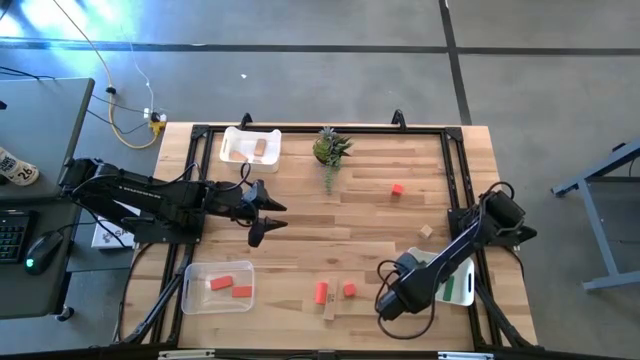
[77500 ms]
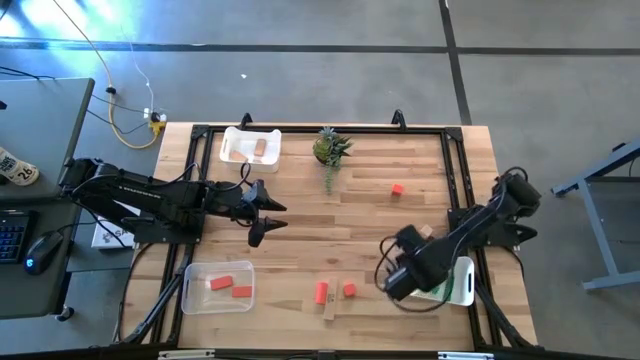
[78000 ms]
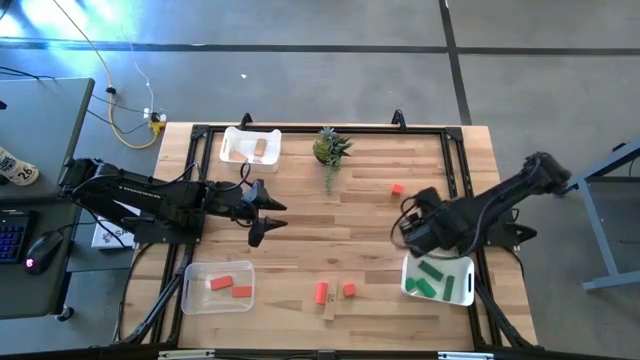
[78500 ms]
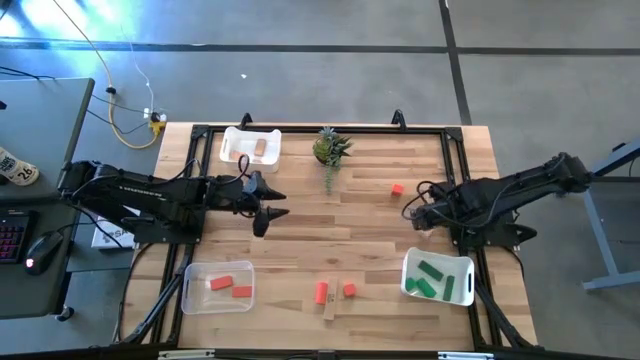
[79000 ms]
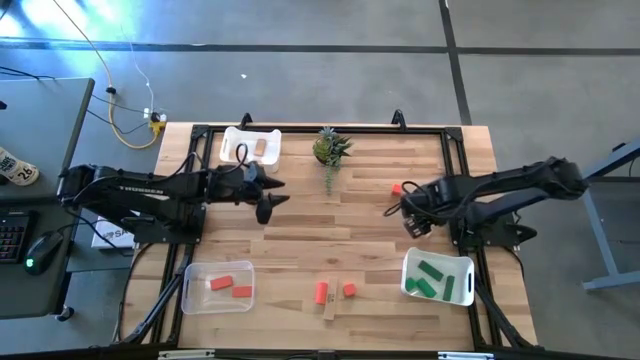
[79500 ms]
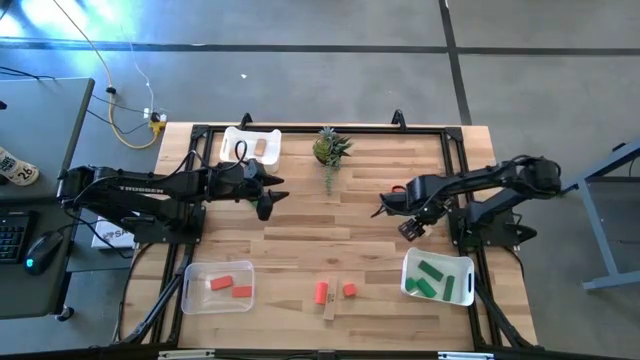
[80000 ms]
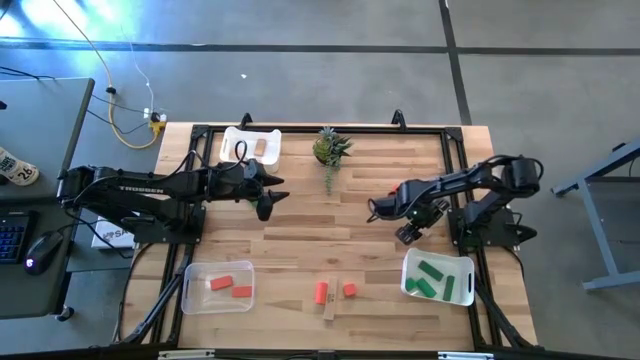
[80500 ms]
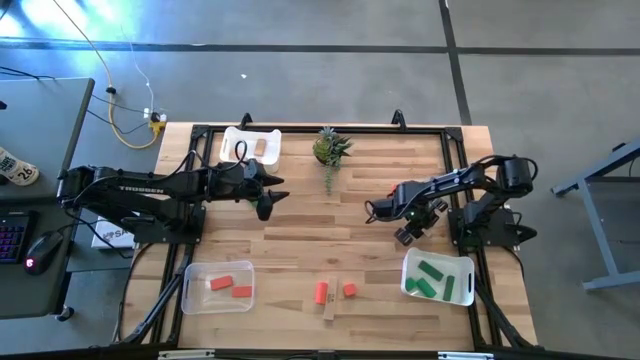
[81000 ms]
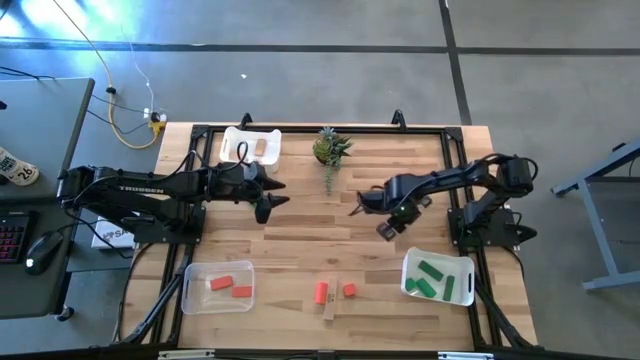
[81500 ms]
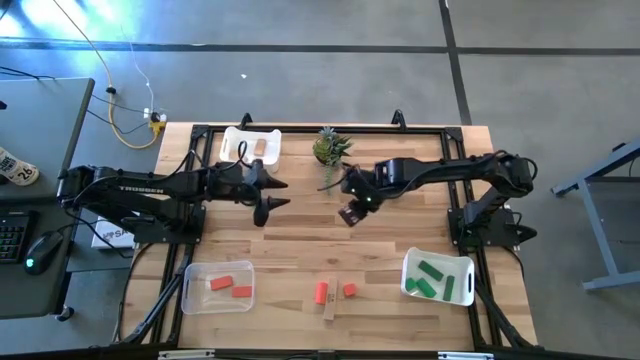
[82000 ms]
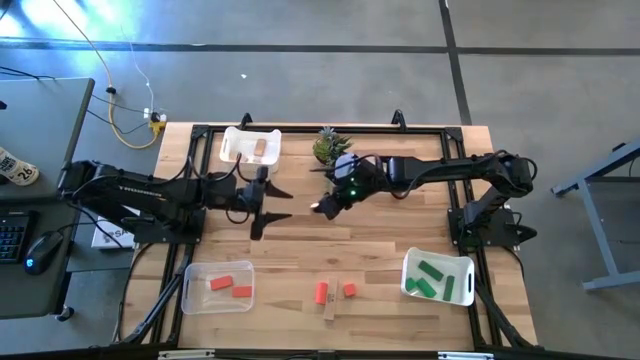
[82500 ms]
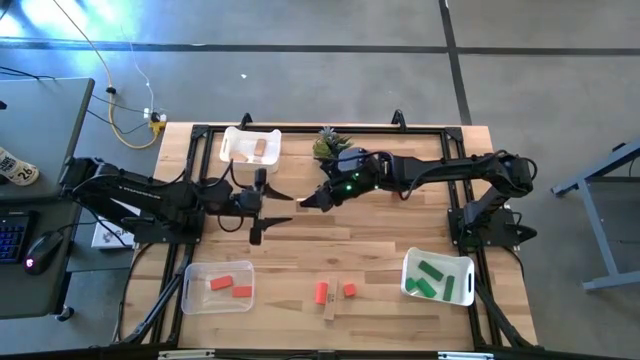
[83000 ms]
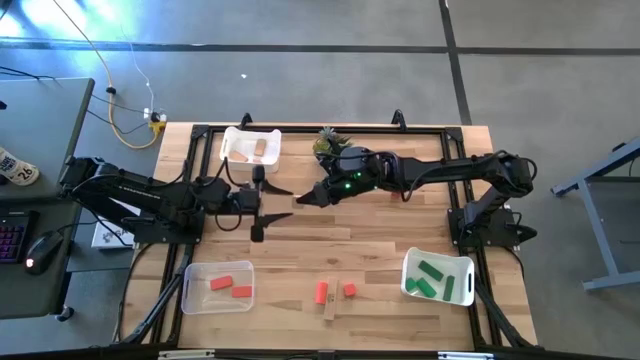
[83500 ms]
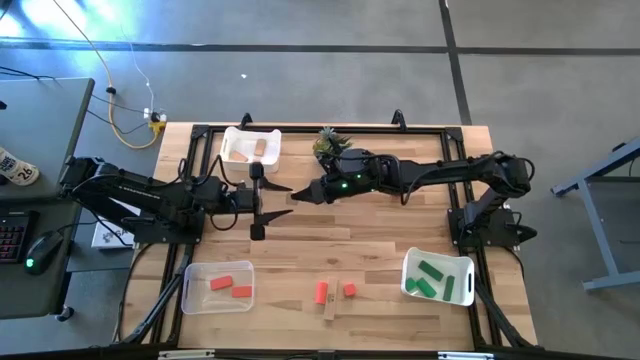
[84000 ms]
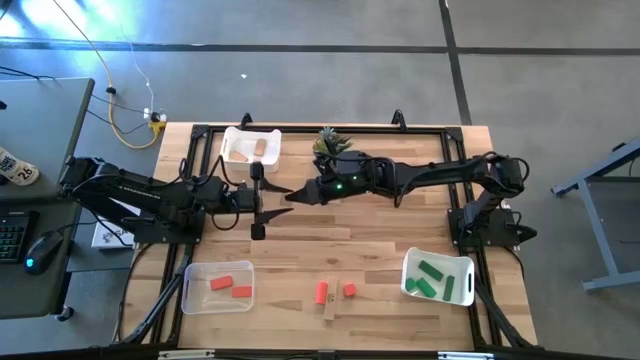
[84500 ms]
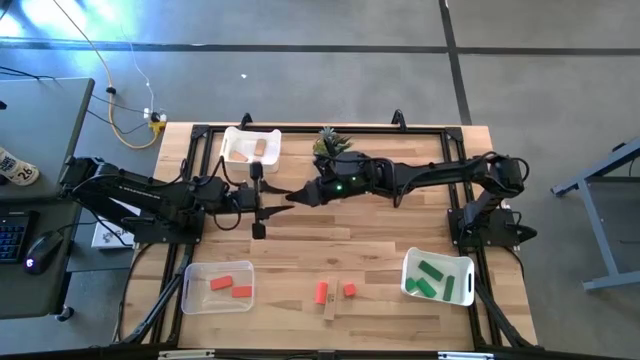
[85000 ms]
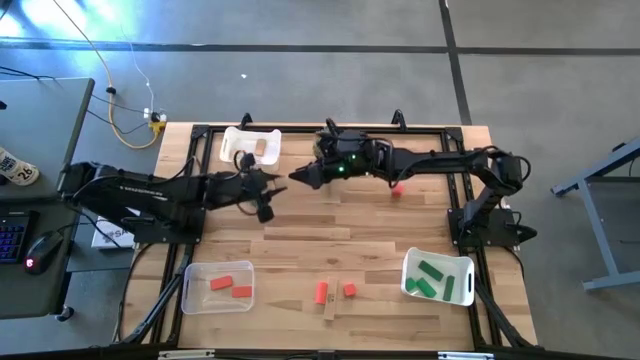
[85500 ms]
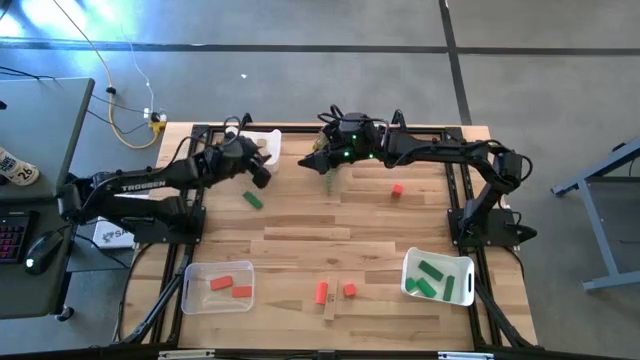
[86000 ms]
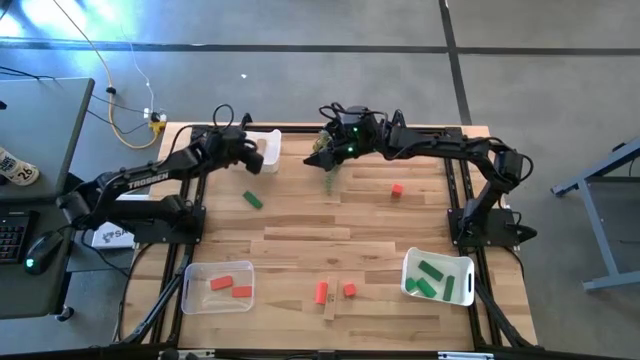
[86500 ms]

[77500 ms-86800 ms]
Task: Sort & place blocks by color
Put the brown block into the top white bin

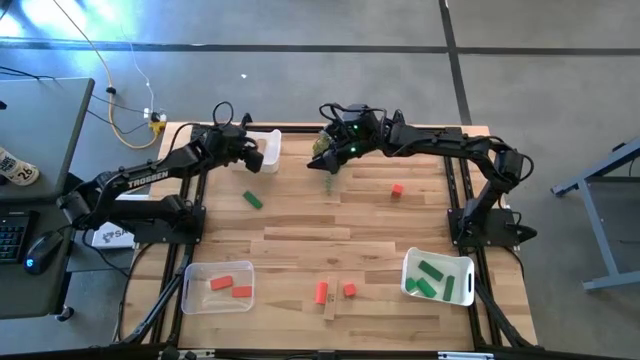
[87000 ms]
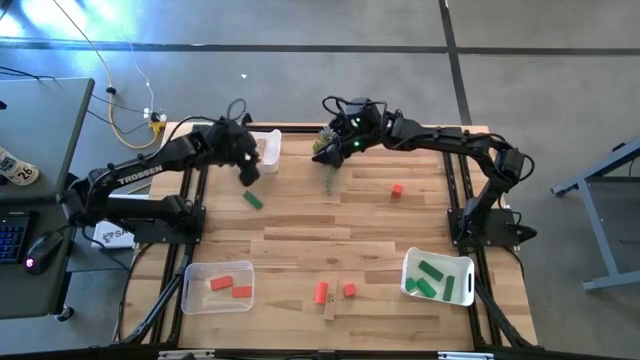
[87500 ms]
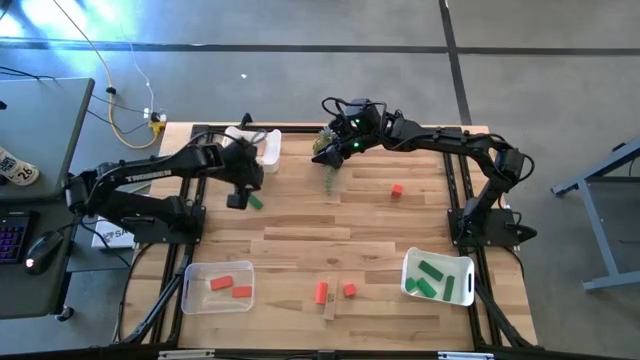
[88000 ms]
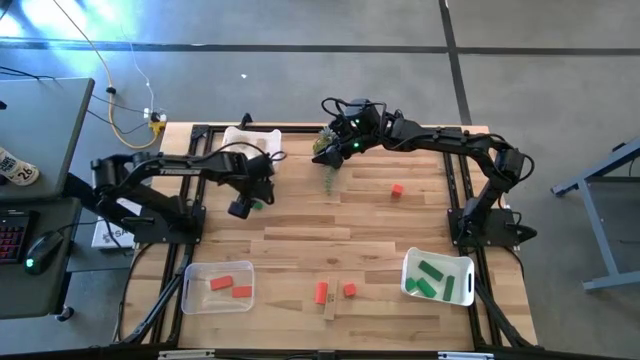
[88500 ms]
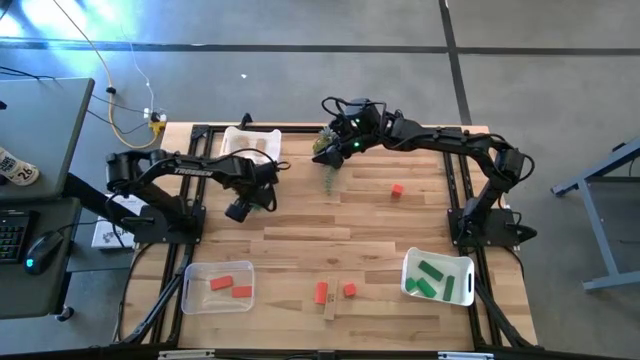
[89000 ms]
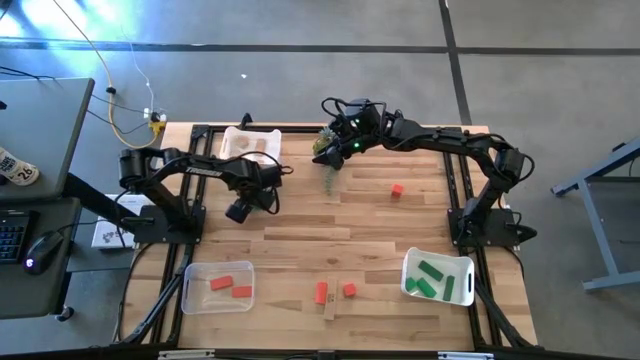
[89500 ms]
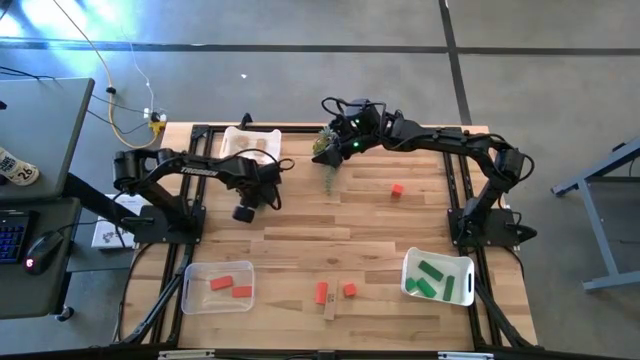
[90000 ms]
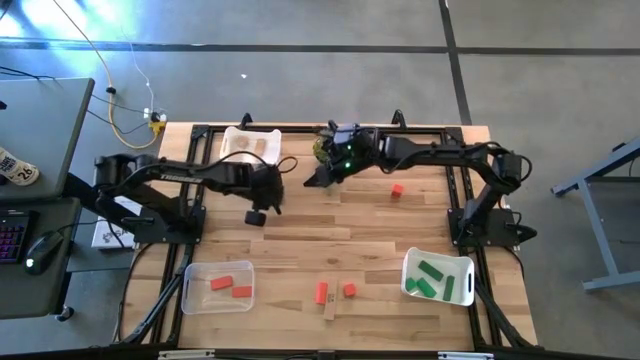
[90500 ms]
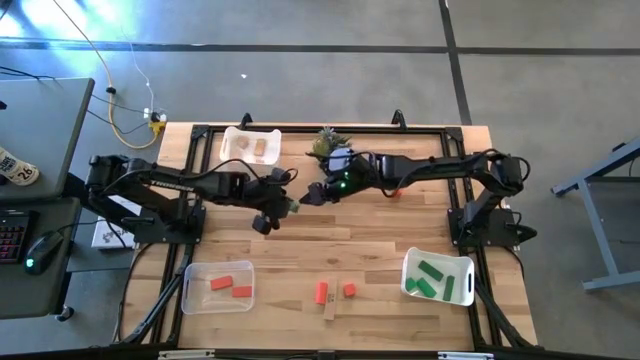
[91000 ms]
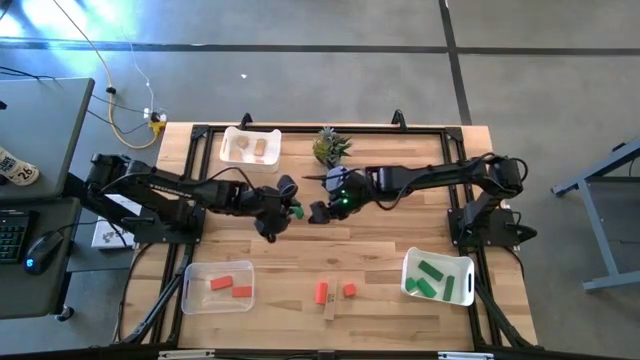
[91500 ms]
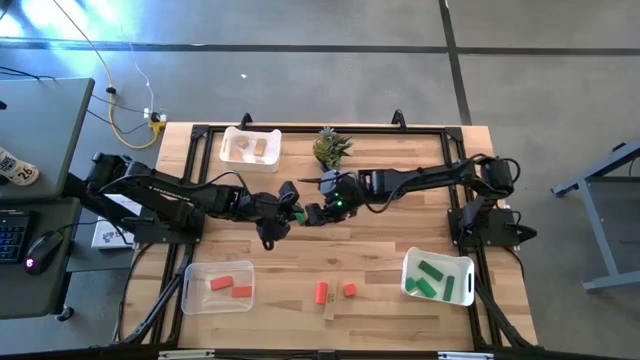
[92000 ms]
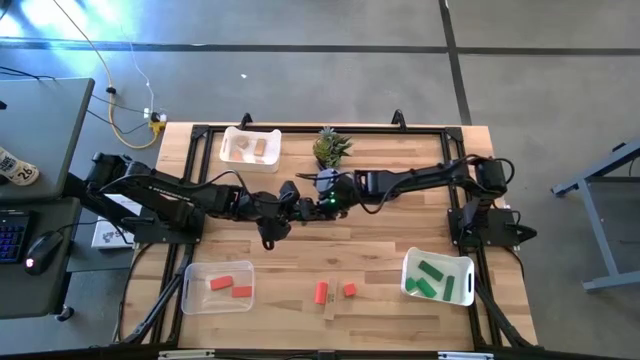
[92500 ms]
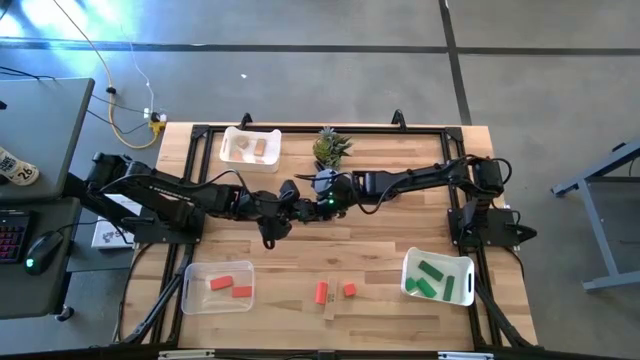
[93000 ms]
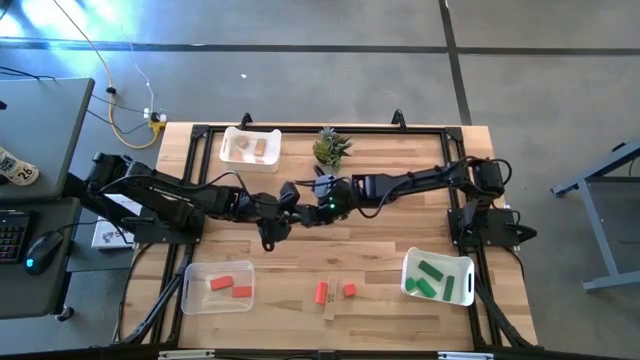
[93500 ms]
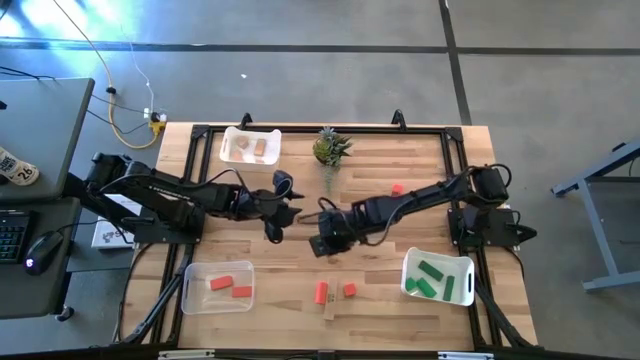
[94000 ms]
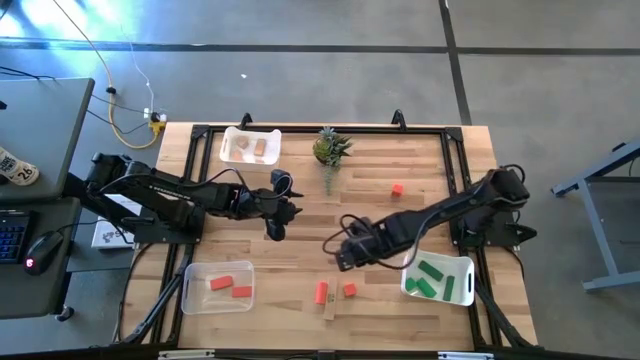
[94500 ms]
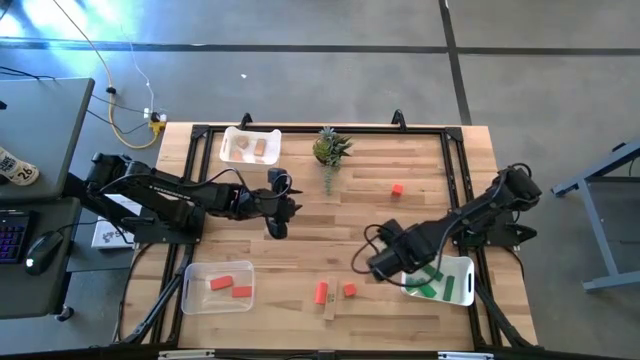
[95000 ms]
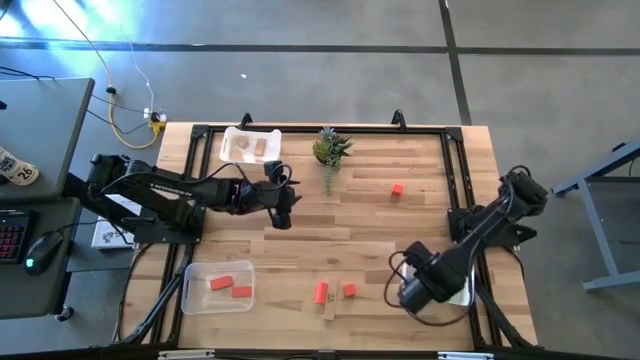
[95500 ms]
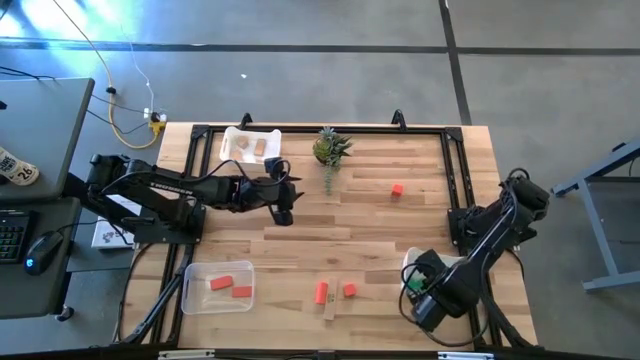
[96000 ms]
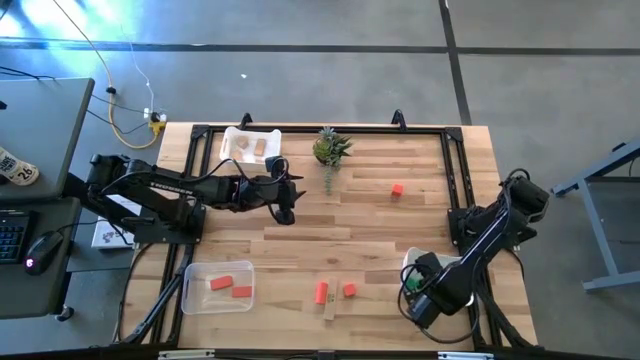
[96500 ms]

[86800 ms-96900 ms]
Put the green block into the bottom white bin
